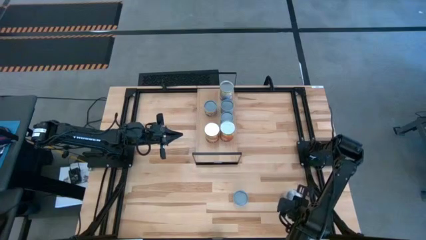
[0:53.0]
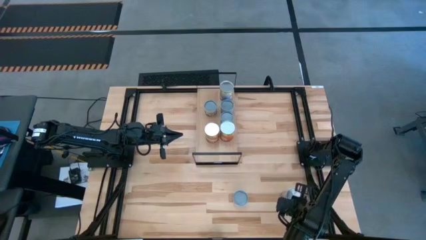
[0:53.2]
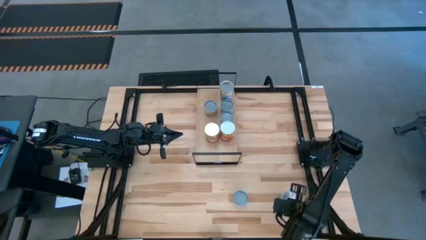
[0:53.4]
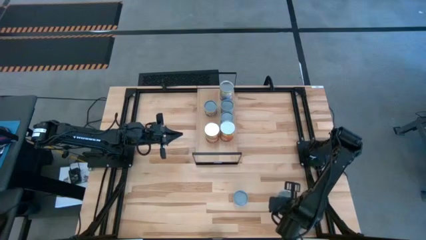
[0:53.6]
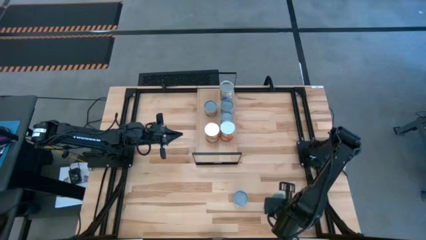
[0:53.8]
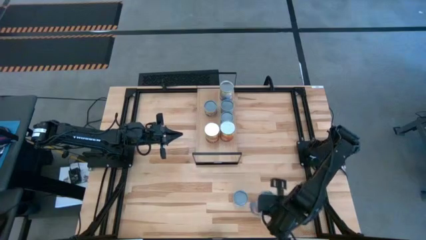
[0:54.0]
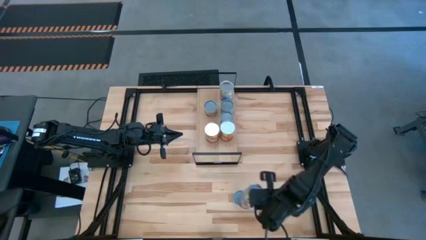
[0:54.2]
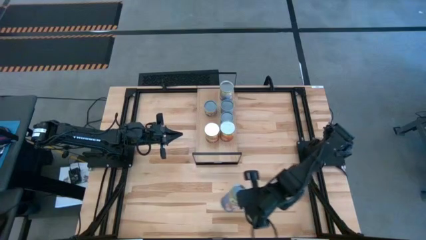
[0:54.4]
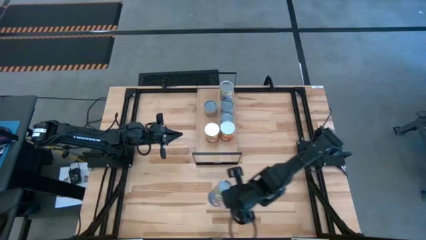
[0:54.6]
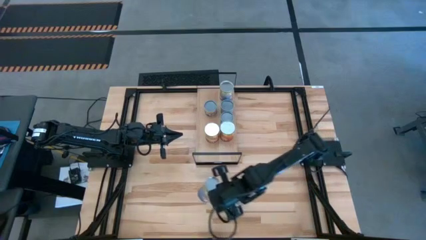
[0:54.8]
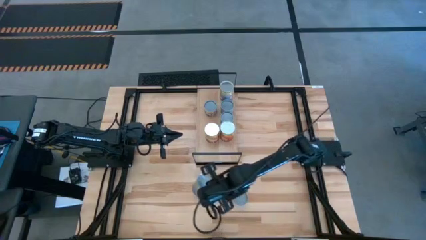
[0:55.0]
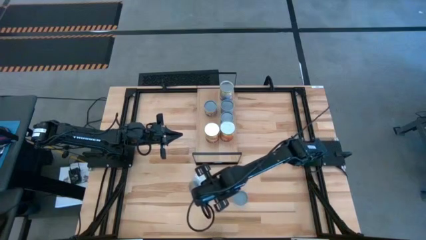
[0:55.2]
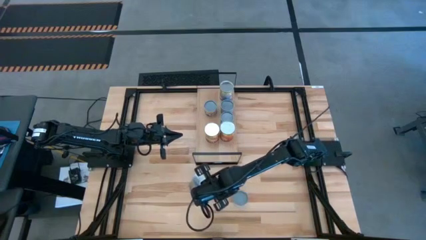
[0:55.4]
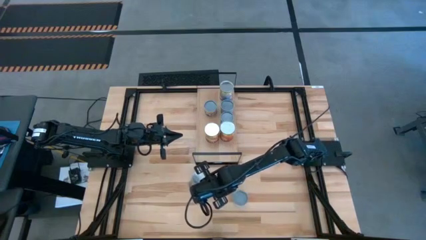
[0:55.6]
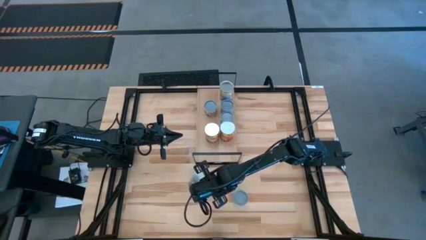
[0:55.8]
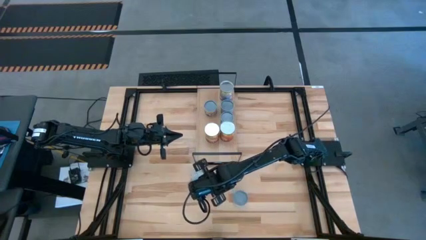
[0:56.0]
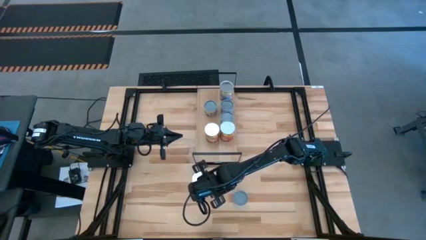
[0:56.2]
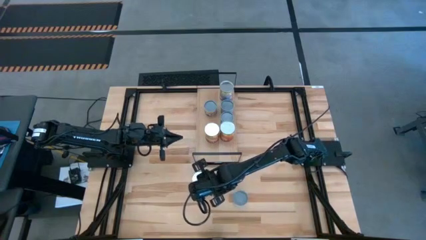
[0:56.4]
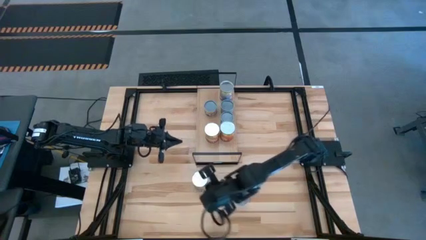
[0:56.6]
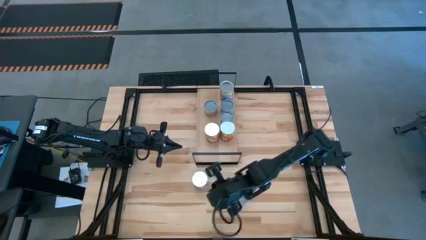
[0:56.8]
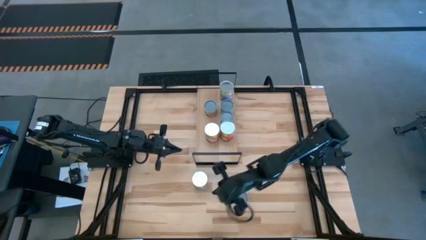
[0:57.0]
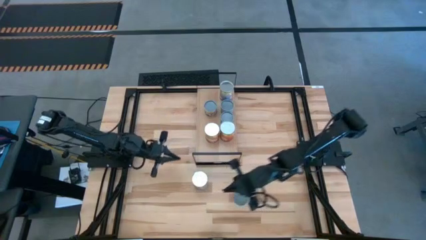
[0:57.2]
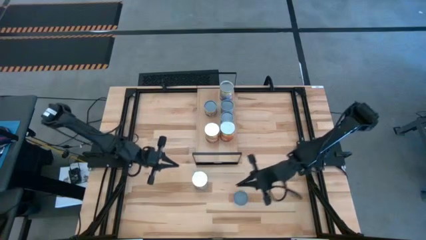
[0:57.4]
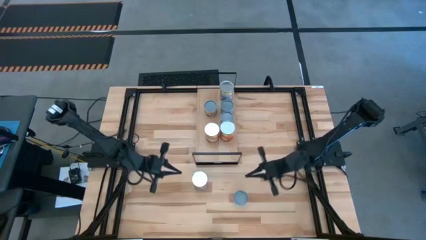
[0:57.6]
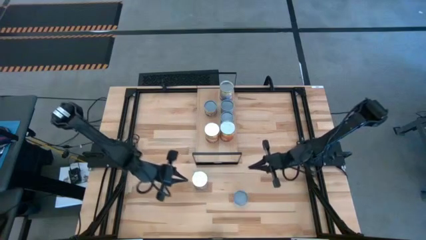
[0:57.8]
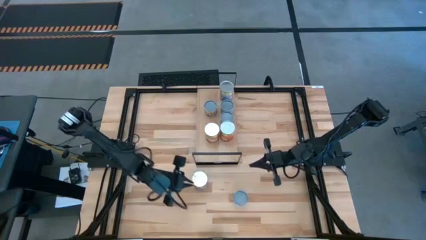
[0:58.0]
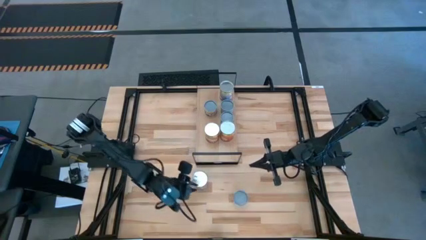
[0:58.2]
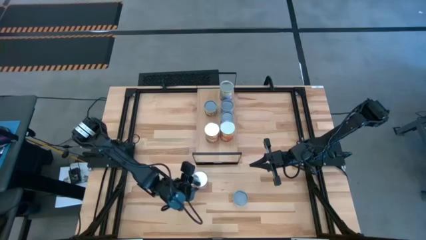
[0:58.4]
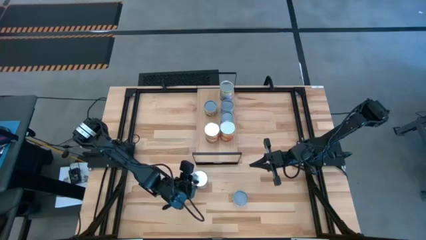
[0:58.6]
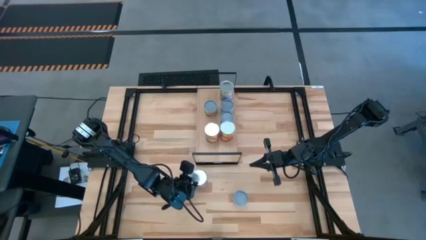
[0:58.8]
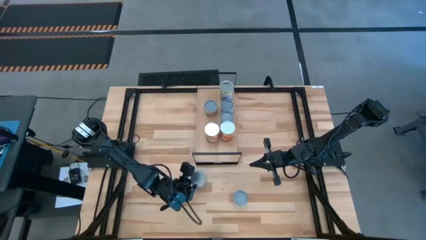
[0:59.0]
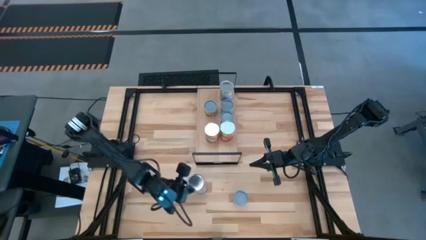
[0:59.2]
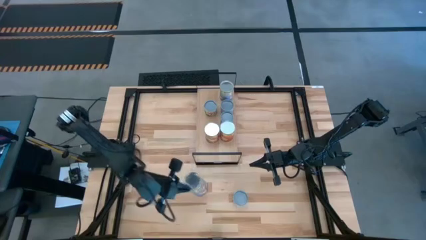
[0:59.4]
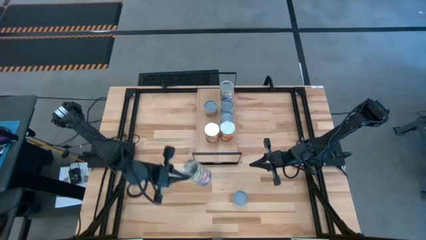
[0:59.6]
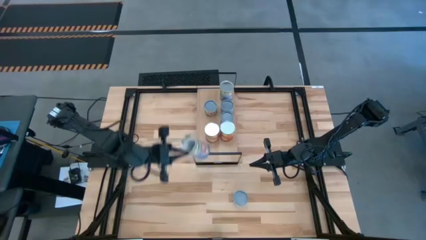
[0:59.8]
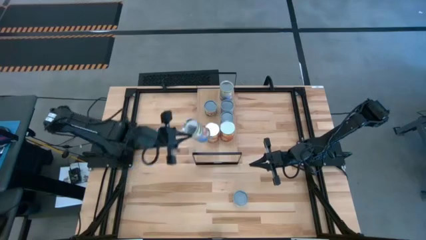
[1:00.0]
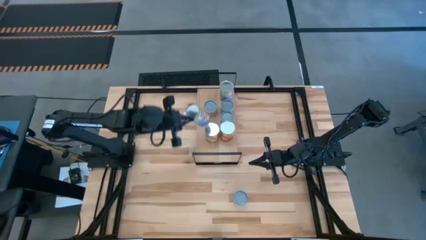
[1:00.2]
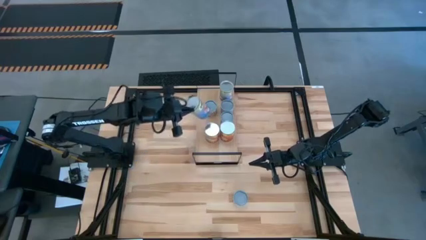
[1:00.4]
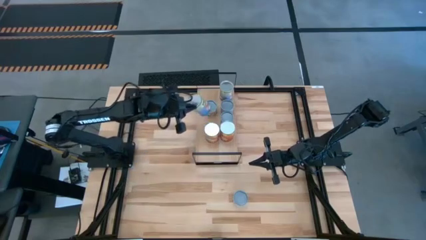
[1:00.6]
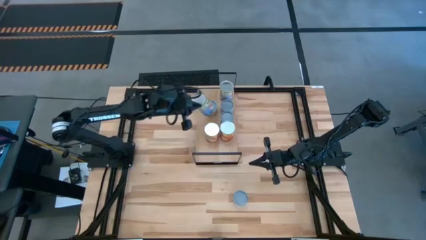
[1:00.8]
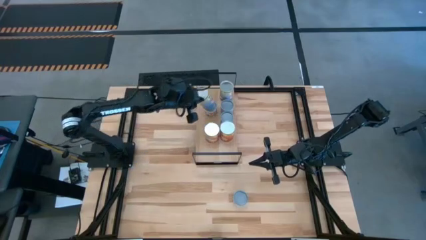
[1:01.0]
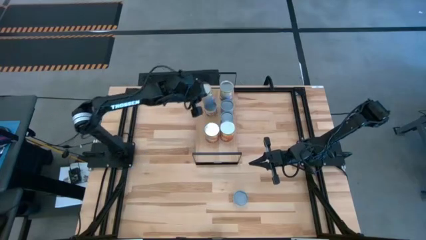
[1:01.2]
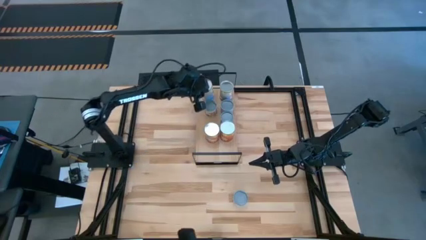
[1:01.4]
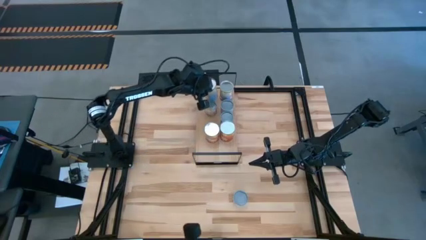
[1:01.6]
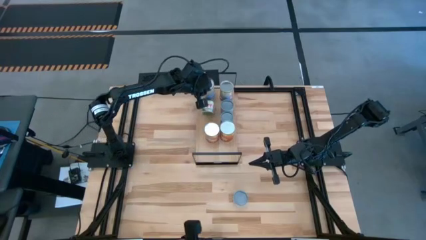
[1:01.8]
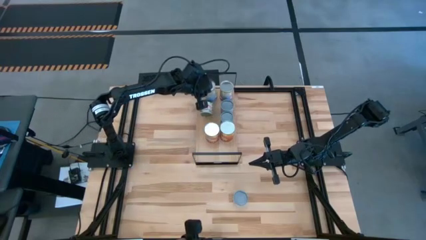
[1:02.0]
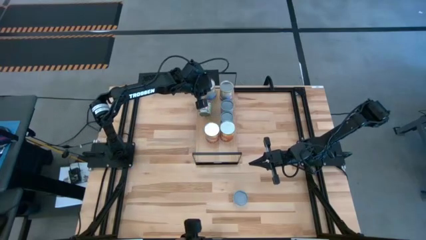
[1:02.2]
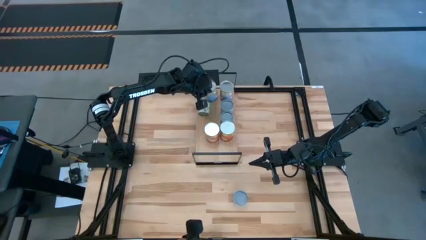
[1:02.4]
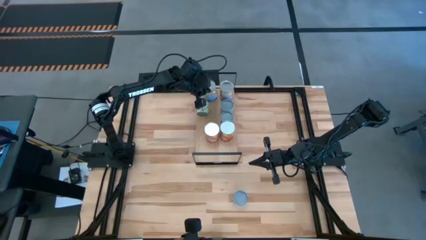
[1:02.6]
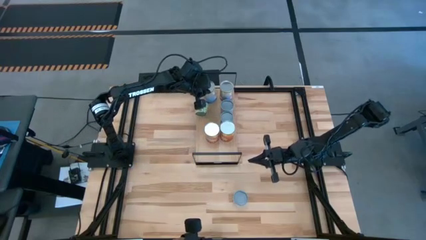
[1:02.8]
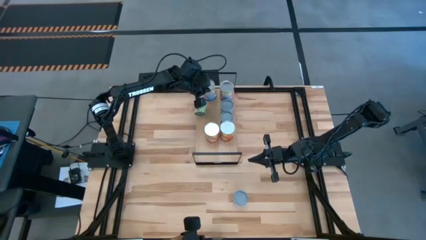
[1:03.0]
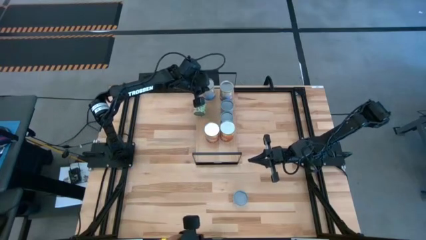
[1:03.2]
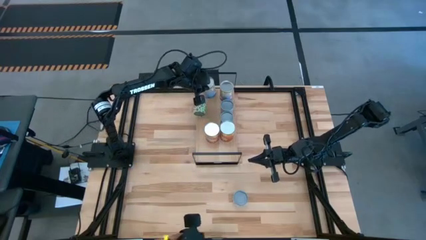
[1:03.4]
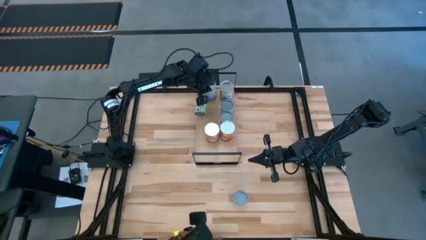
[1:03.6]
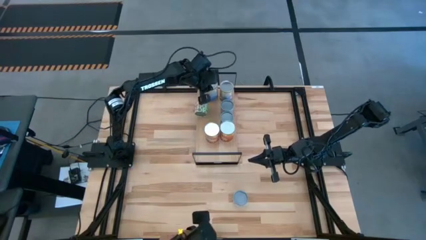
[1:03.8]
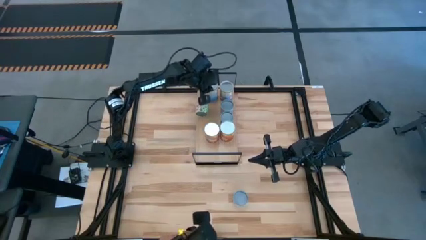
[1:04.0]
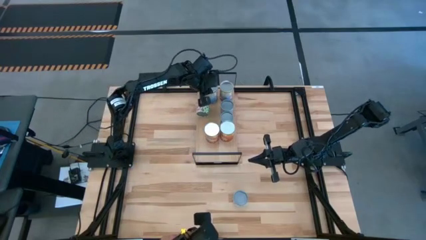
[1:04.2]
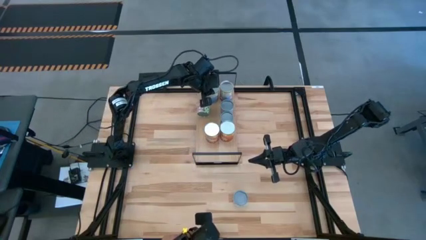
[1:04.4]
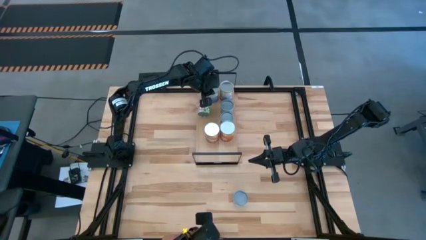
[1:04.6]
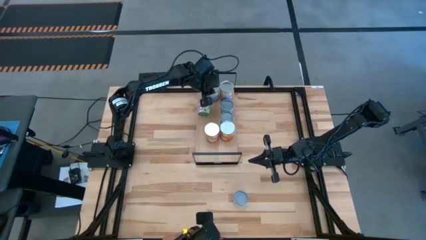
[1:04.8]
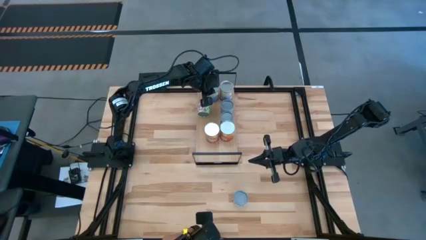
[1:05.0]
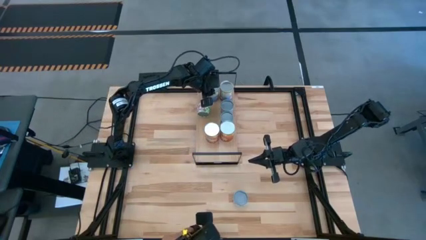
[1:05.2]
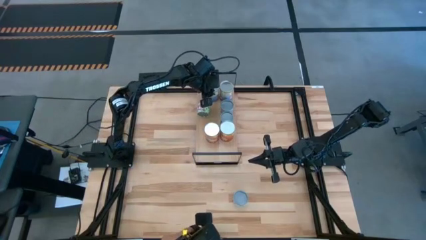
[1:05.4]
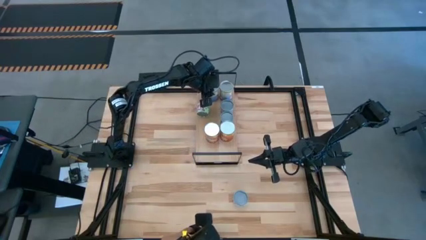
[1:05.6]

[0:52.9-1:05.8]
Task: Pick and place cans onto a shelf
Put the peaches can on the shelf and align it with other peach cans

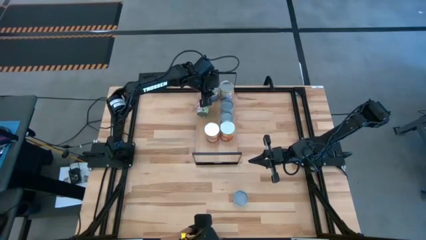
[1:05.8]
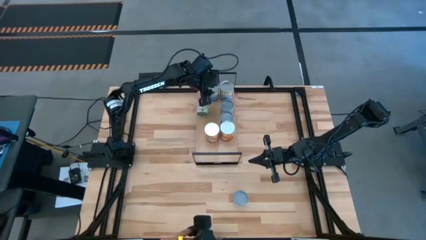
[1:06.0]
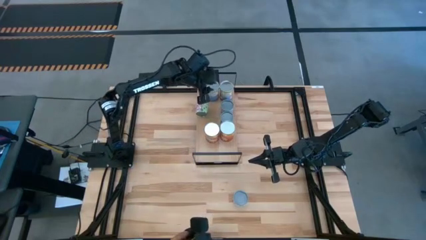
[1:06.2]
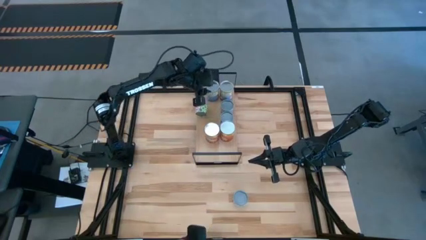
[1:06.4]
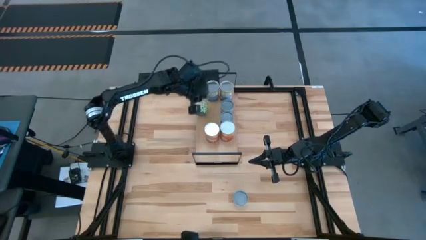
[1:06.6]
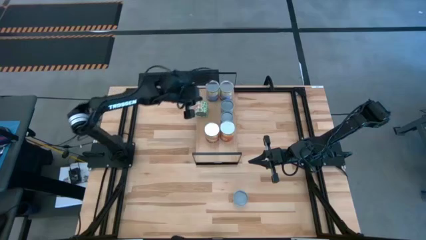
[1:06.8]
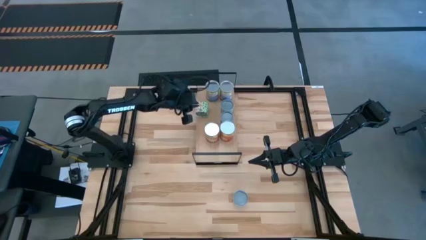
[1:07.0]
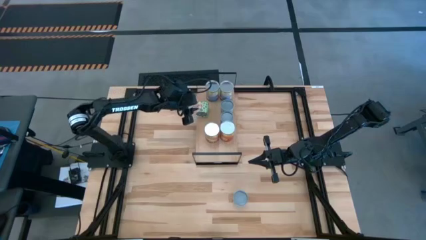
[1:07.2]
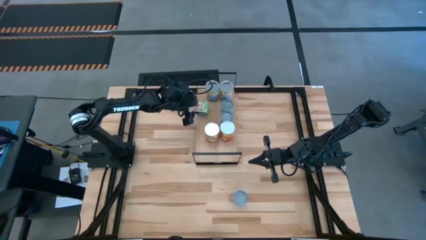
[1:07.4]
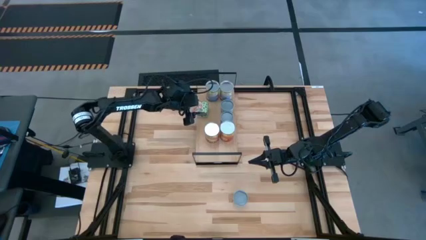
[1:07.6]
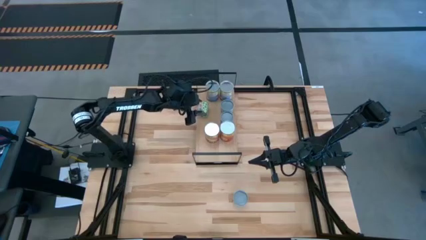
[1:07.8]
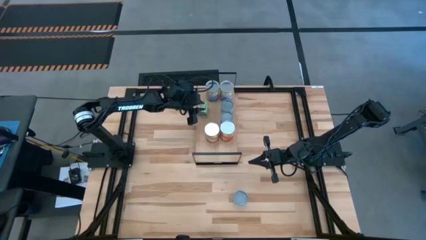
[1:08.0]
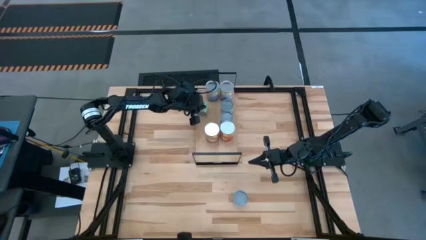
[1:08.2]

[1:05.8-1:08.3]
Adjust the green peas can on the shelf

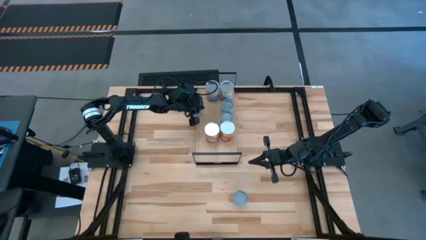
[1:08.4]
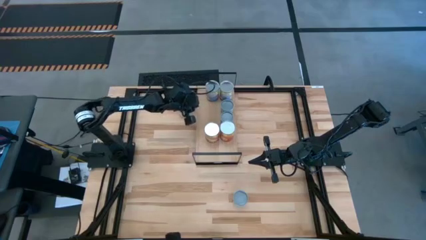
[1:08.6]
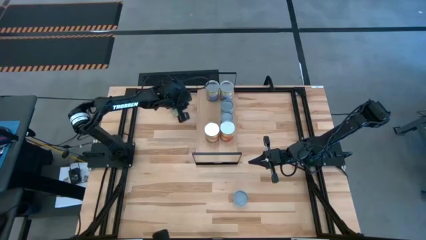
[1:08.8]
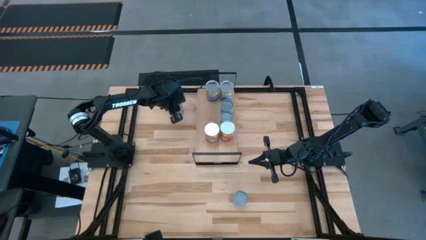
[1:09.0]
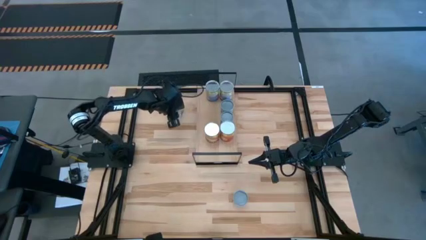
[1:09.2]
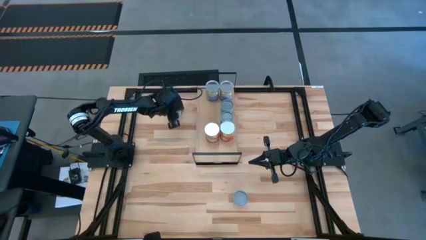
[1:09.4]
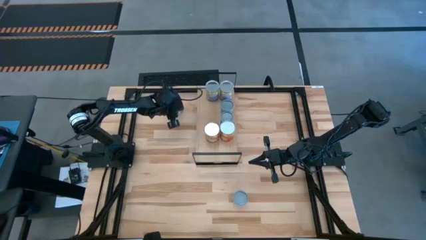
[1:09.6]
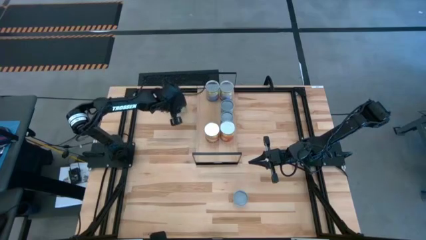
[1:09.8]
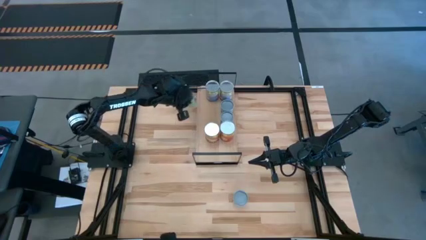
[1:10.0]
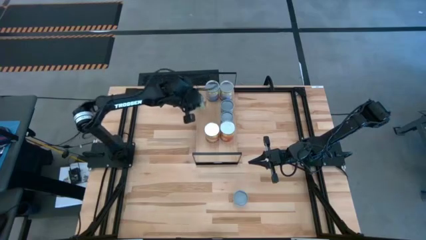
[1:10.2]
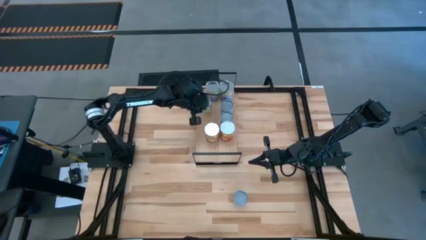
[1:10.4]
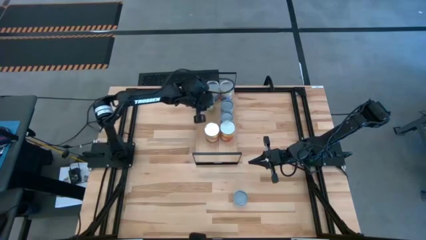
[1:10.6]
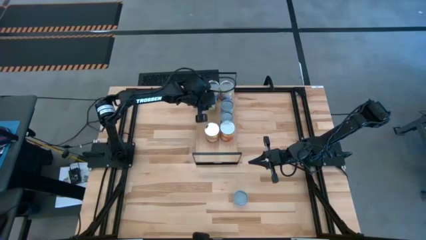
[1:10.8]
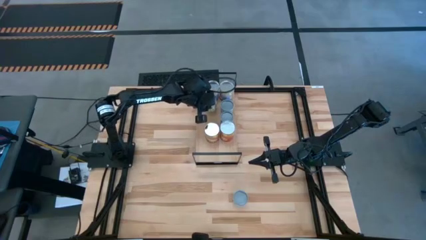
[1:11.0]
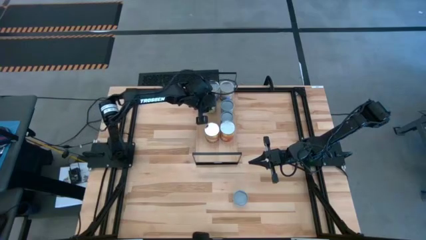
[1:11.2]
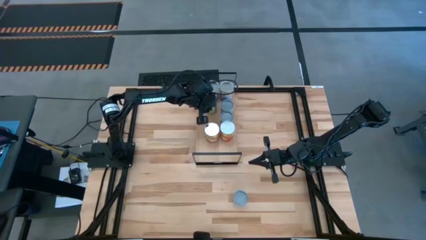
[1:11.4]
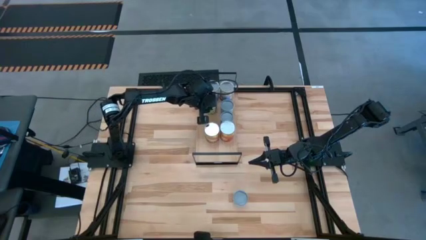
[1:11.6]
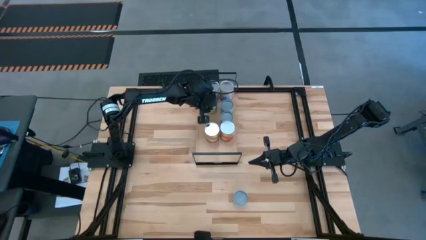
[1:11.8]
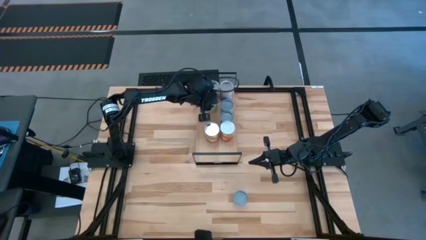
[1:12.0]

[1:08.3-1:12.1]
Put the green peas can on the shelf
